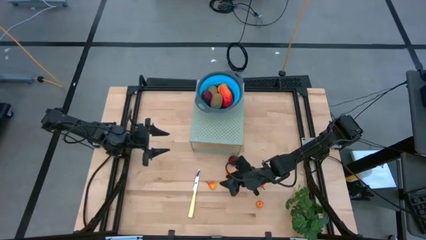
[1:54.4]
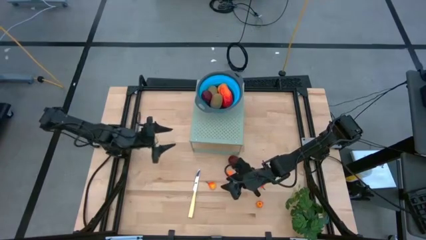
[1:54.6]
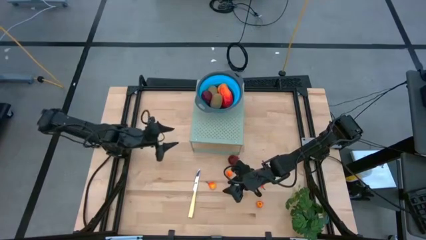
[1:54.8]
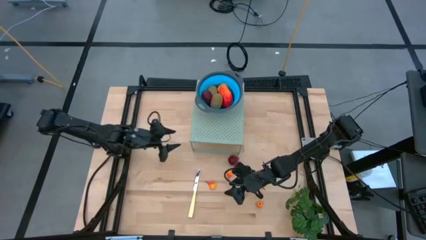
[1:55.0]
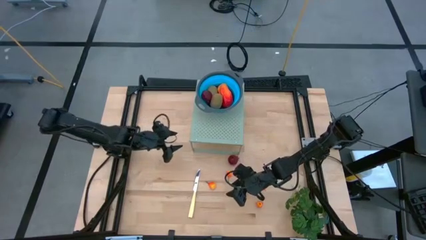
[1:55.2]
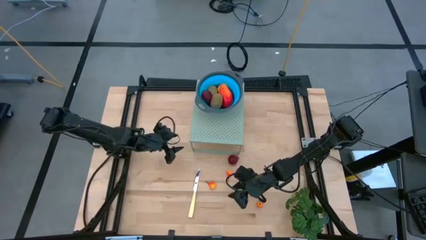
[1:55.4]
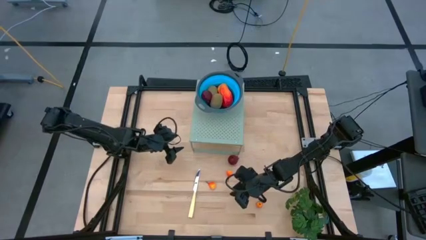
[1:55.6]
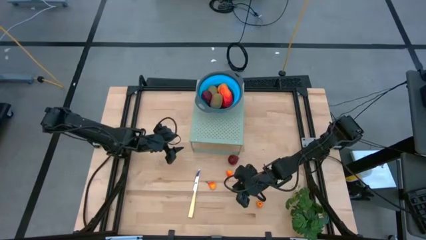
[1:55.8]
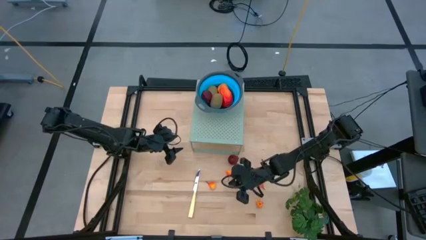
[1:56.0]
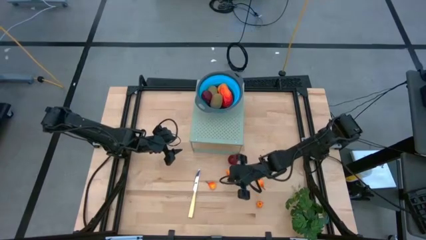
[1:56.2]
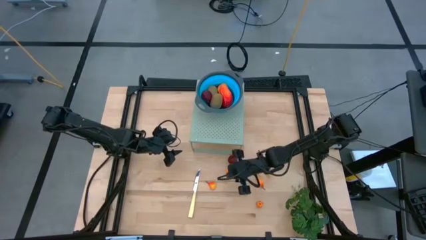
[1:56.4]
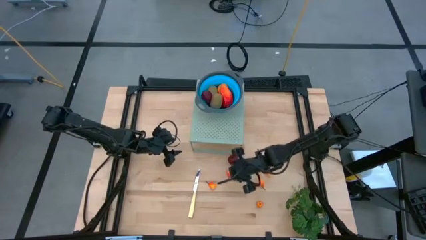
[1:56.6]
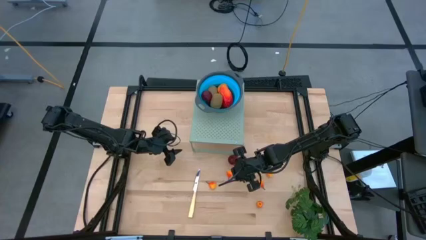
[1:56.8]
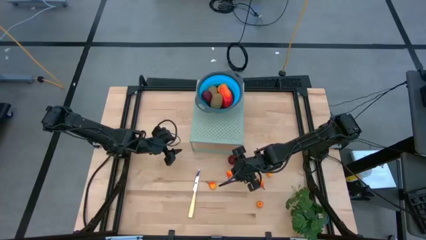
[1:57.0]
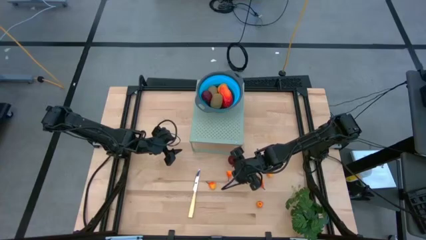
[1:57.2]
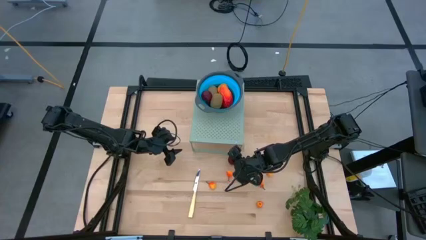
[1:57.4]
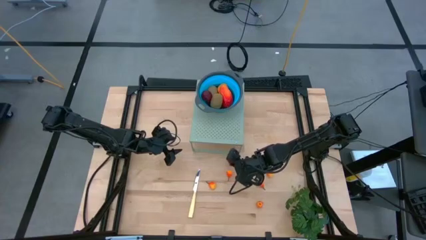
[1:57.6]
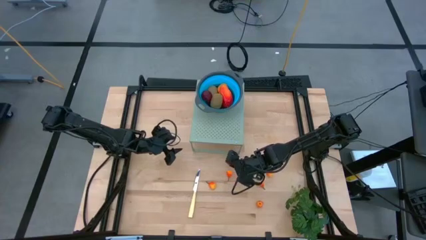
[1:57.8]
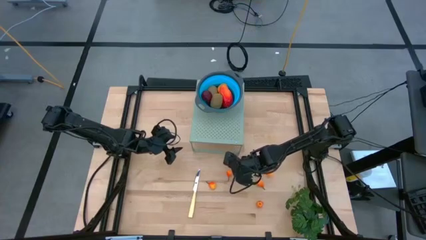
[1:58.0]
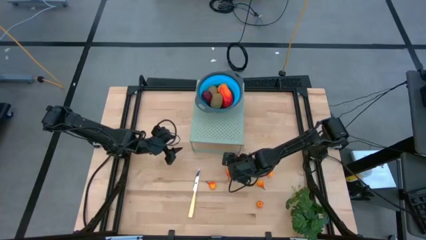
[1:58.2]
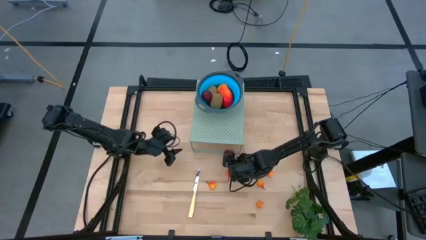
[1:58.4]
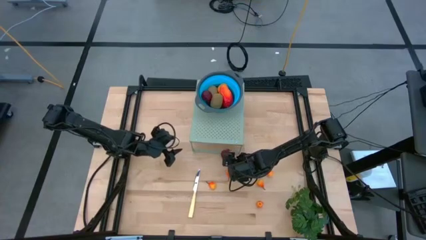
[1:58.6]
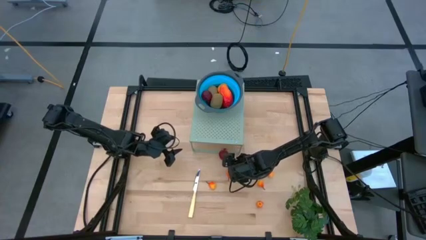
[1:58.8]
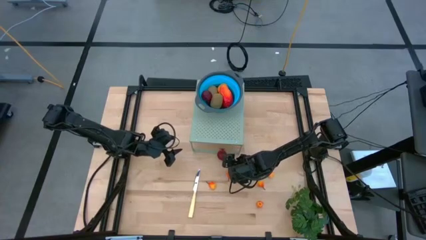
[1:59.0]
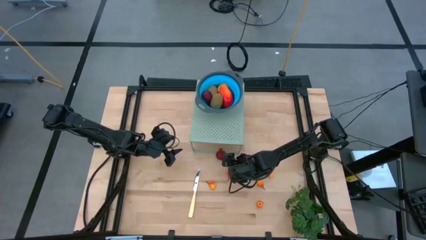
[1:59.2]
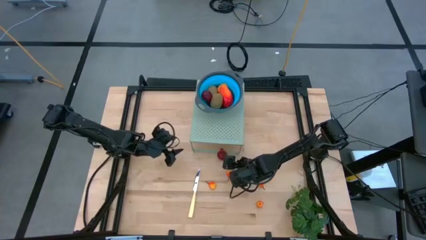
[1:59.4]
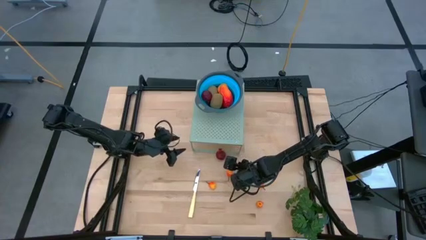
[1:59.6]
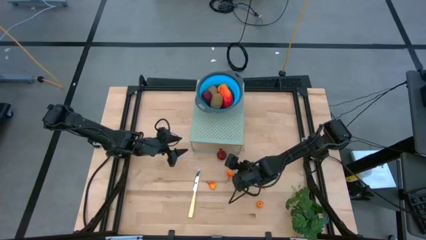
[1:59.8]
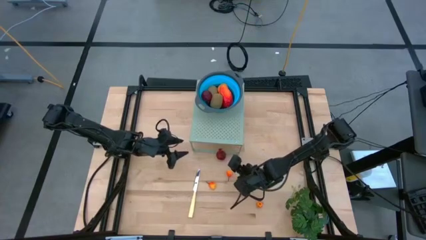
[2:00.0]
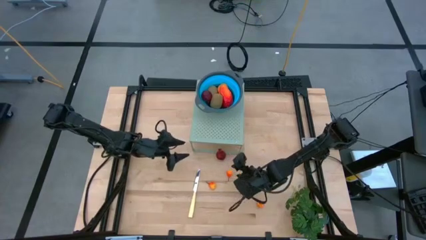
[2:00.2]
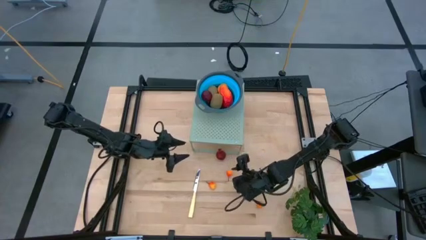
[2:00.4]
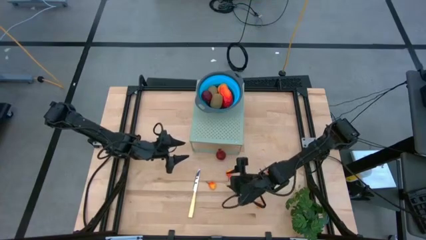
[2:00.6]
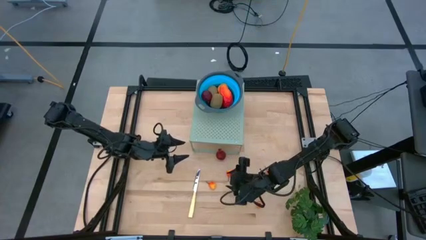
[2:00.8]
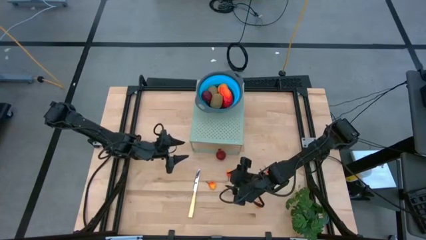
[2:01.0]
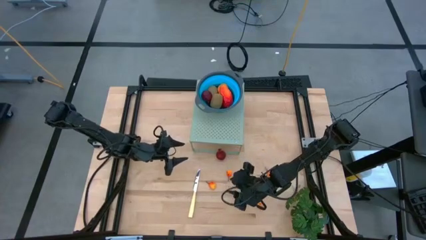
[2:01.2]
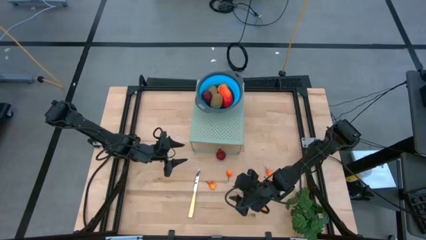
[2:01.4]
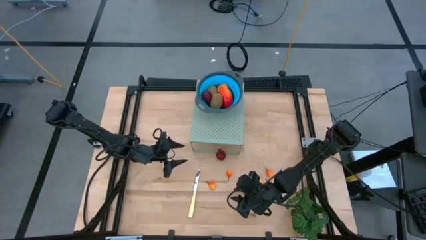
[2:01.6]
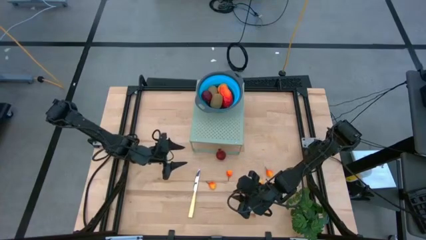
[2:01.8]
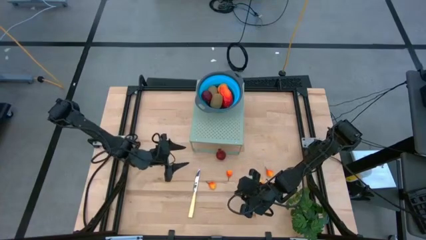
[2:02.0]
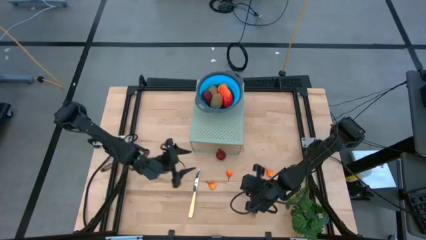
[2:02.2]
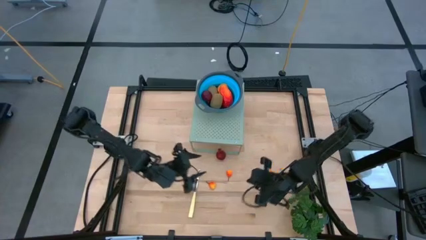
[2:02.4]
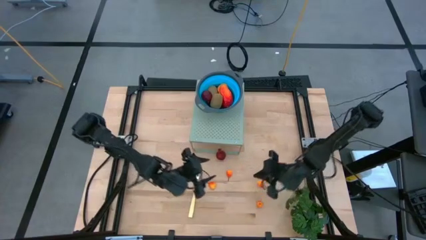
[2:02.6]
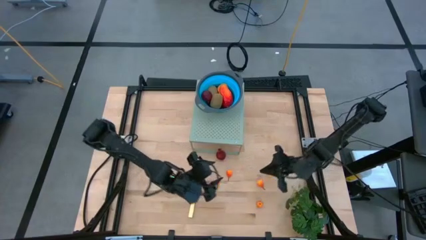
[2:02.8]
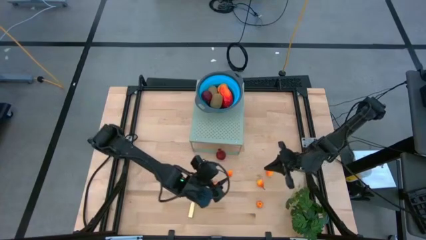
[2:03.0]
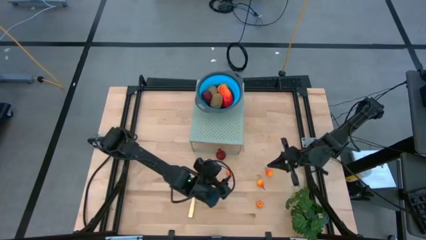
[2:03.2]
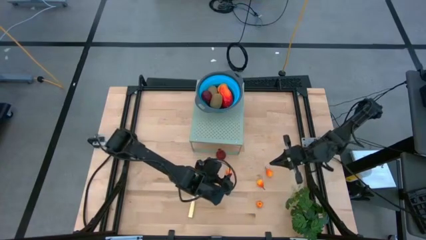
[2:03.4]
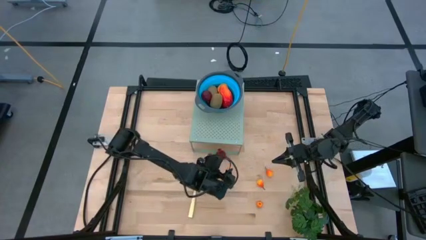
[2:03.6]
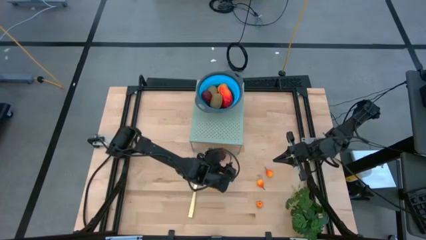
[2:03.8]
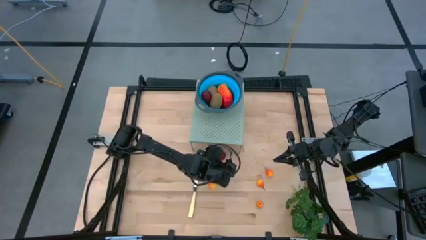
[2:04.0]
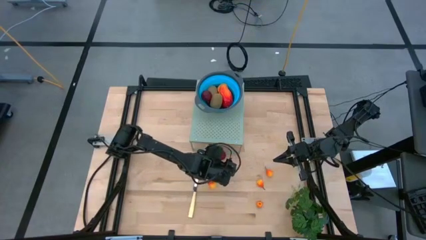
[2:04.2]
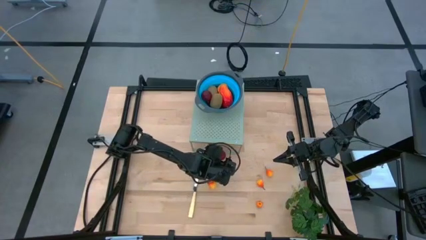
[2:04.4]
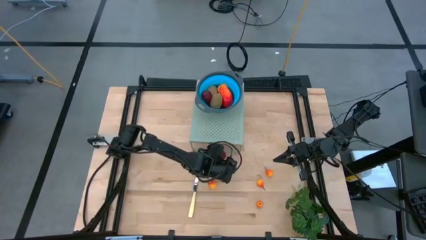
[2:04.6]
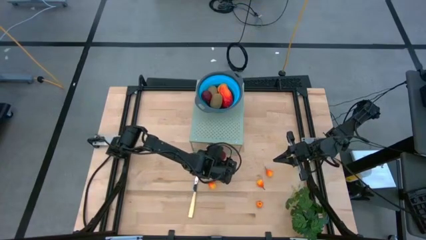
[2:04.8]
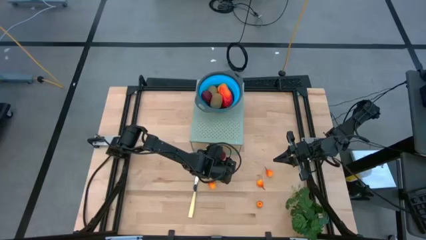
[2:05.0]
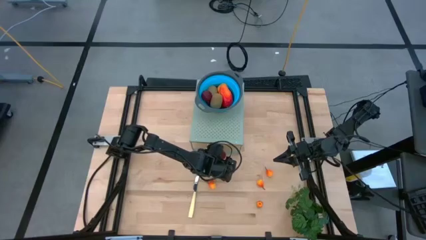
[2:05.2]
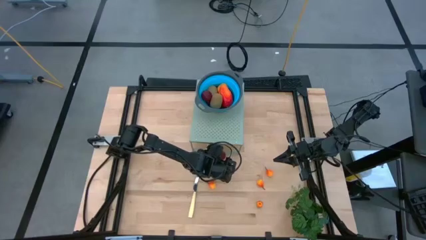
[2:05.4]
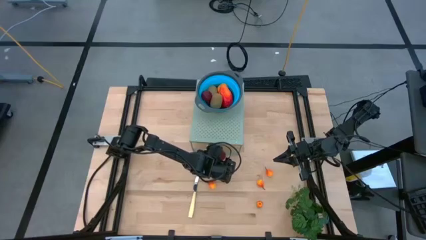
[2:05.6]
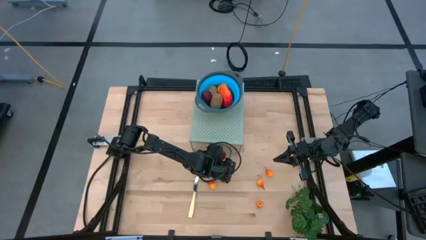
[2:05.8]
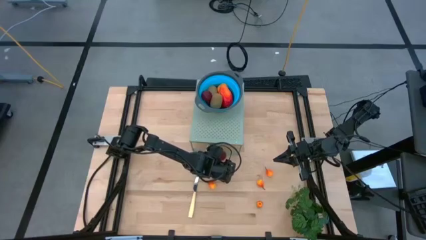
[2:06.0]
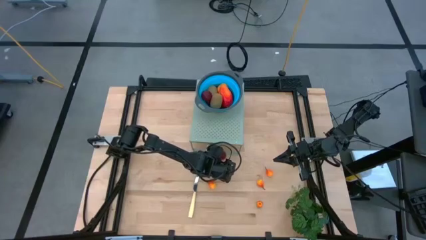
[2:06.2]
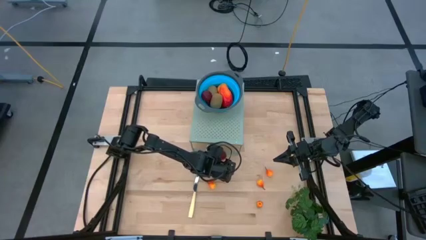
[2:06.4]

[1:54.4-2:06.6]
Task: Pick & Place Fruit
Put the pomegranate into the blue strainer bowl on the shelf
